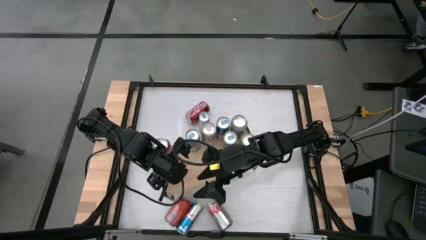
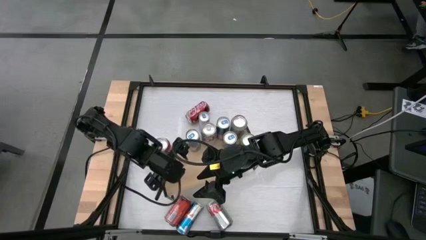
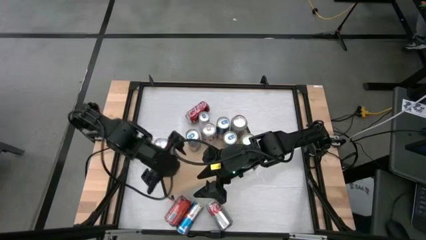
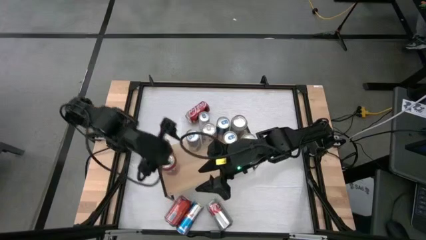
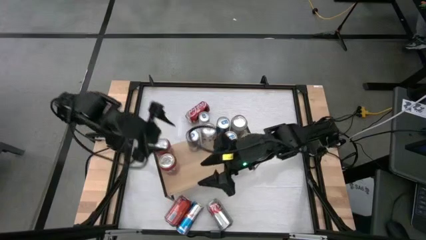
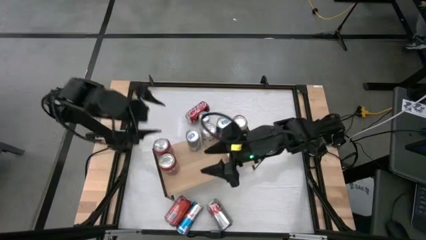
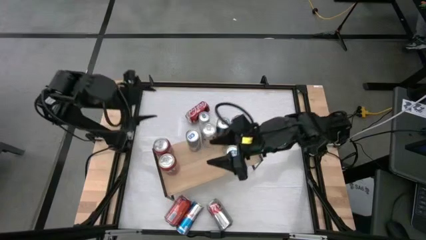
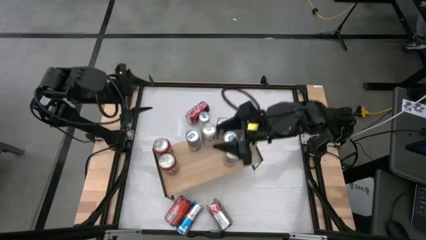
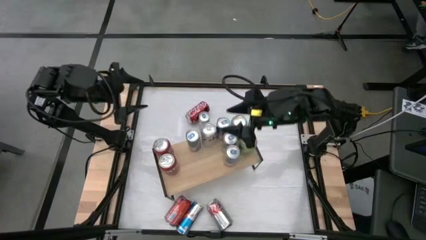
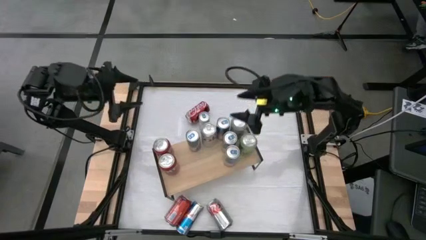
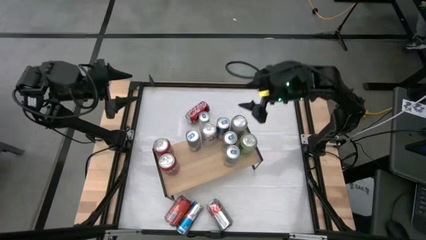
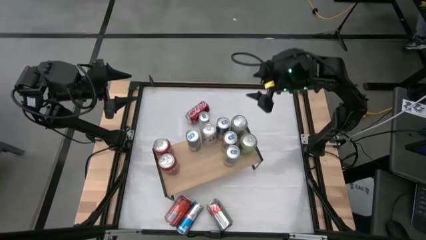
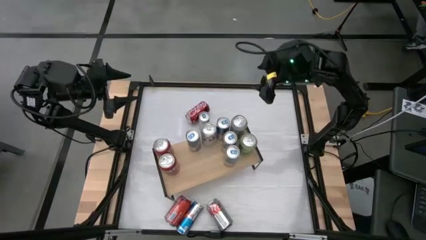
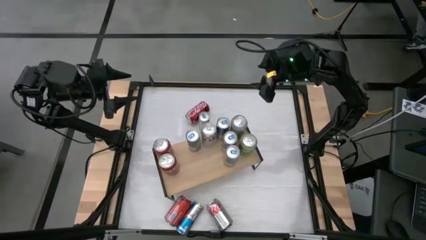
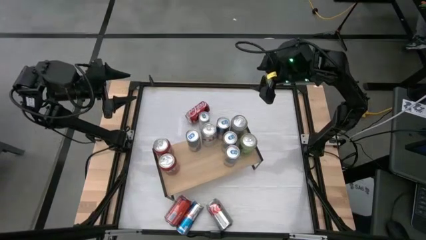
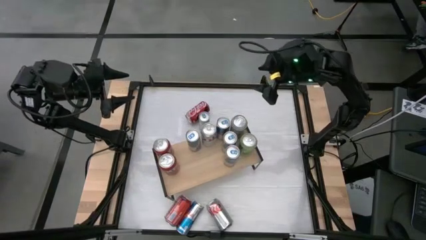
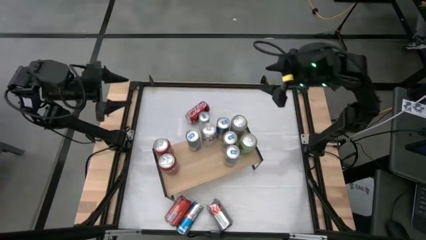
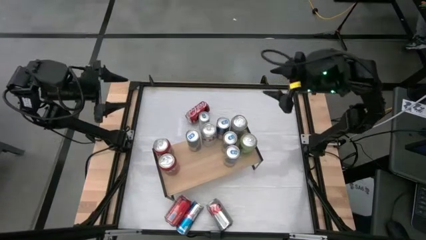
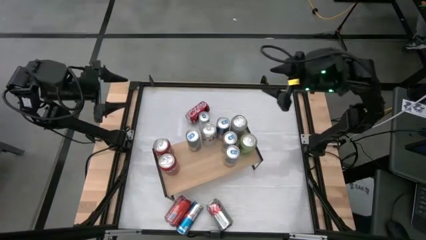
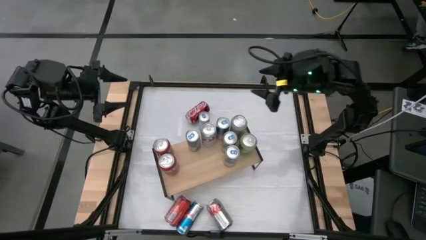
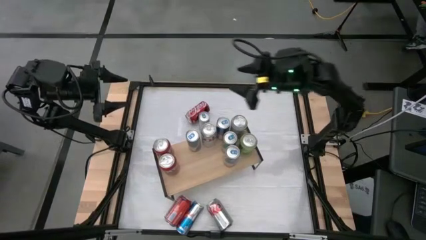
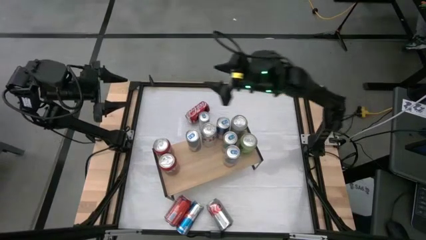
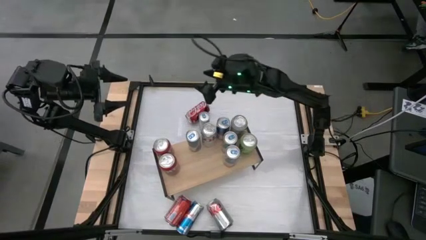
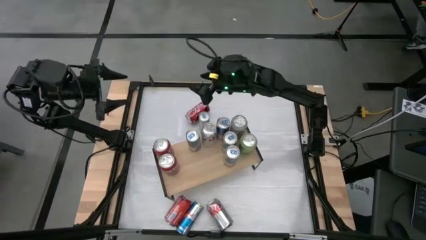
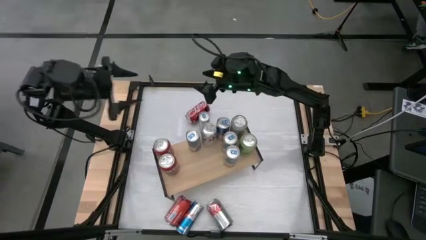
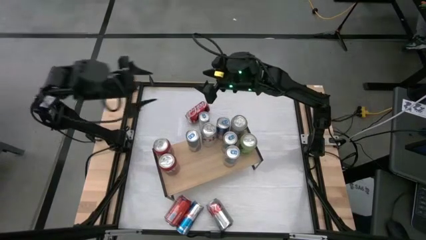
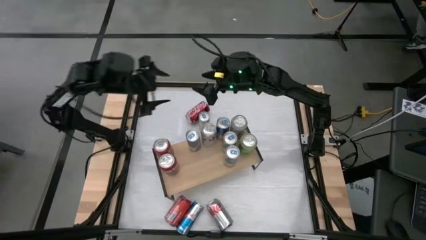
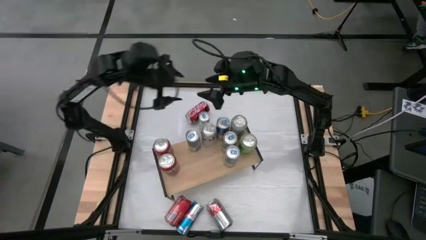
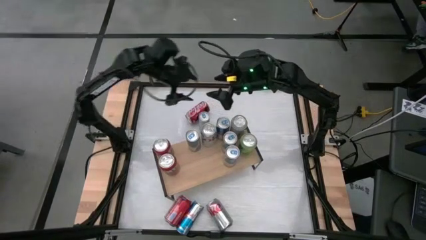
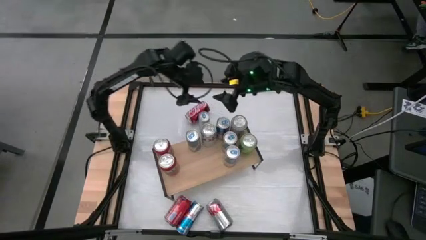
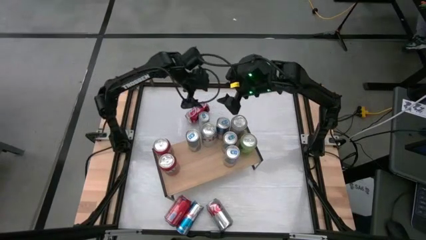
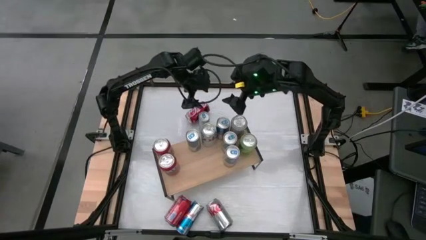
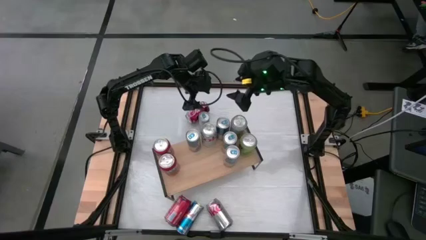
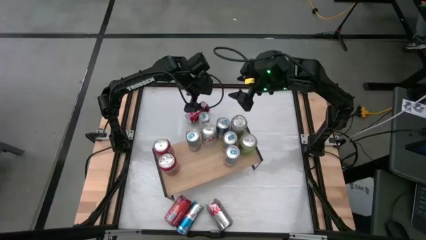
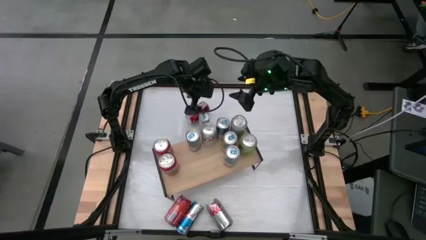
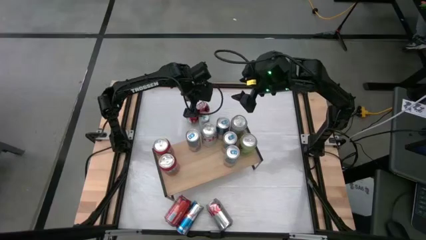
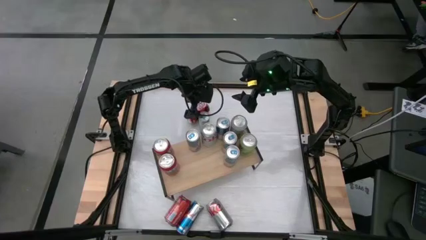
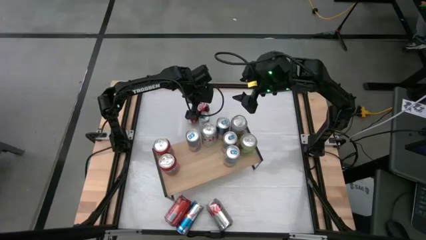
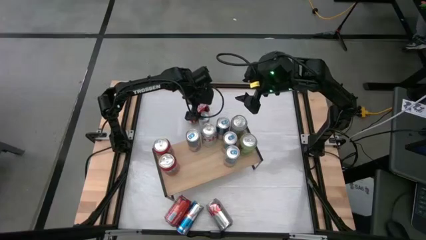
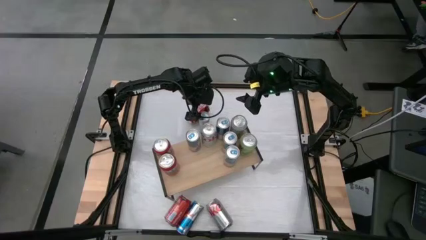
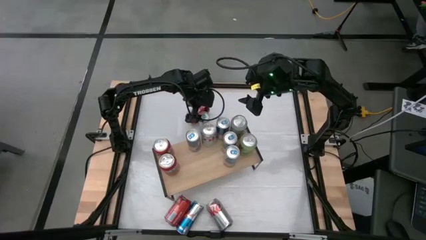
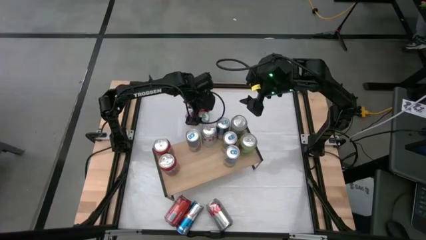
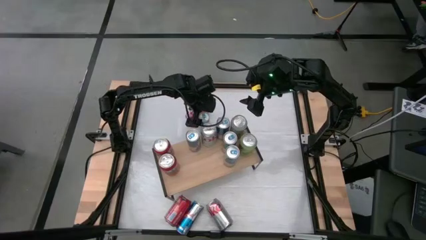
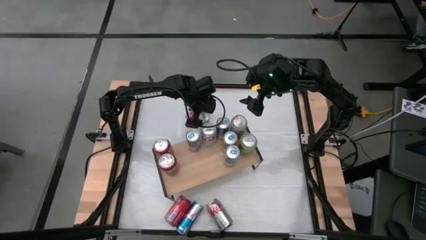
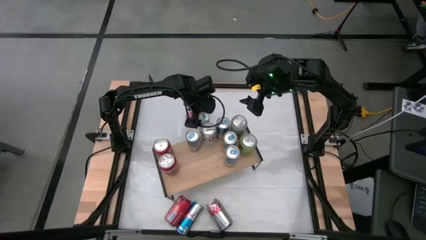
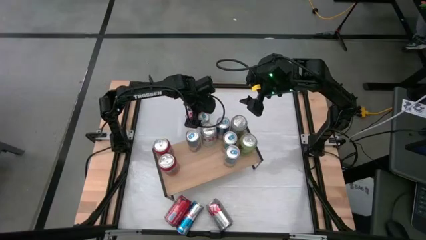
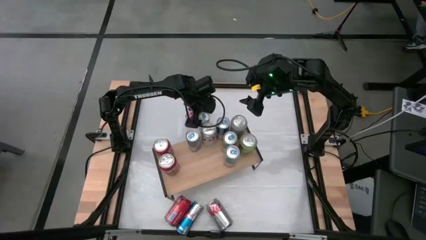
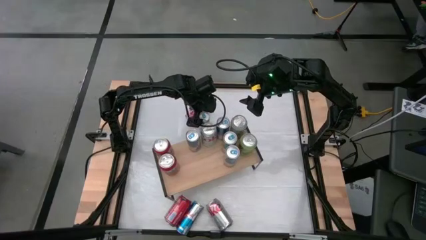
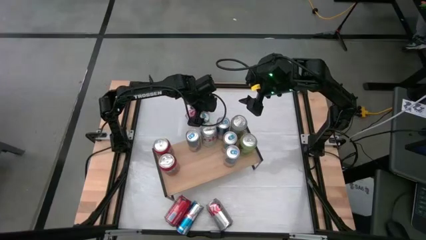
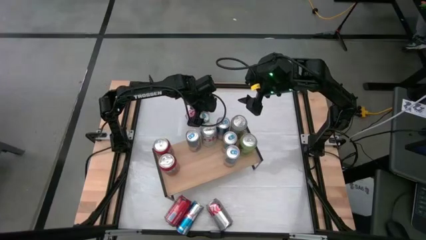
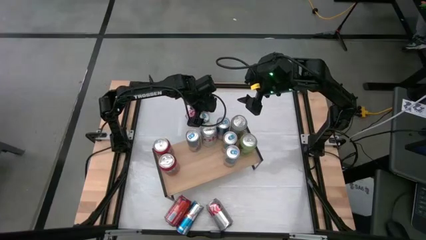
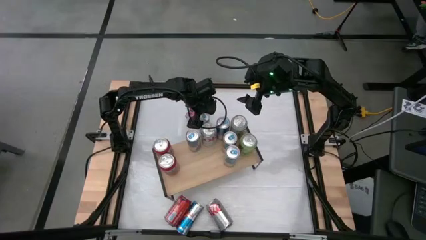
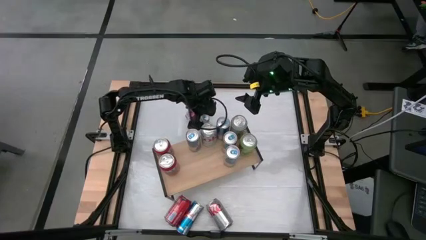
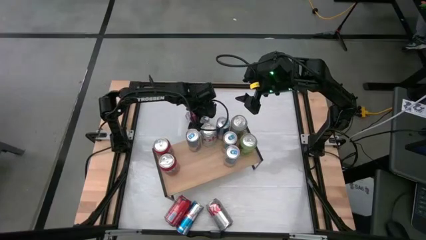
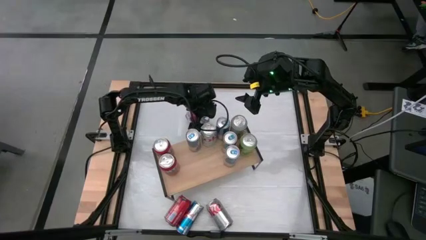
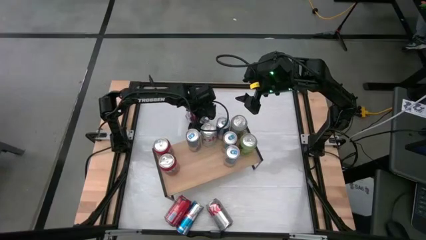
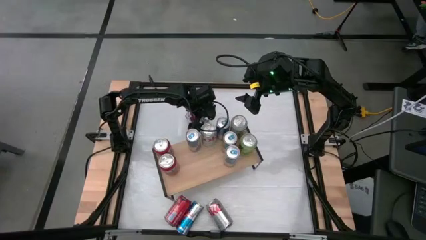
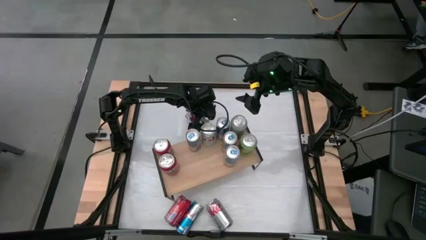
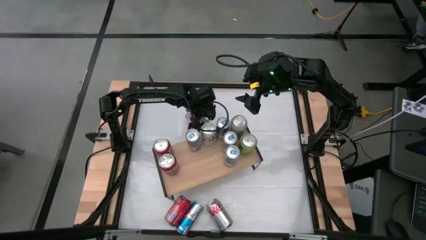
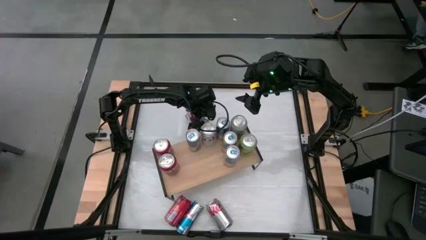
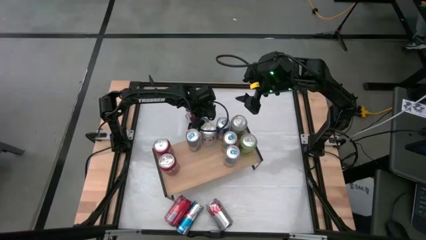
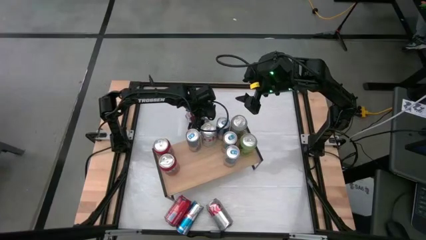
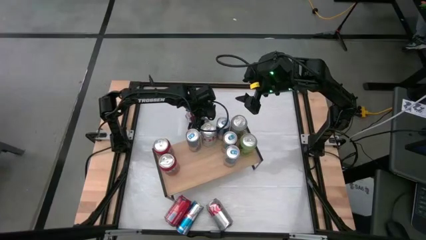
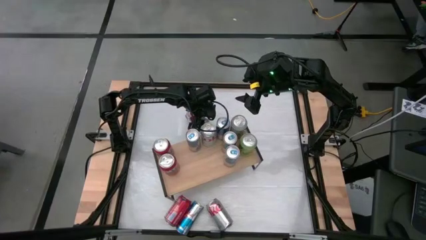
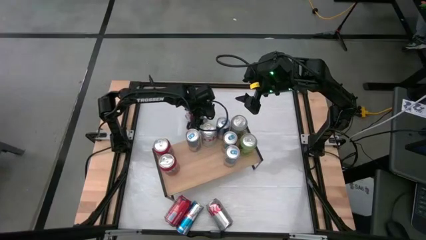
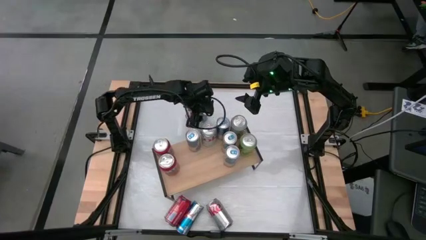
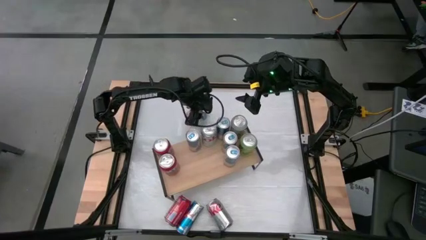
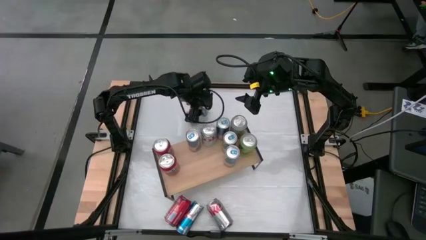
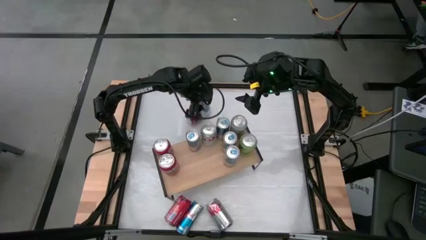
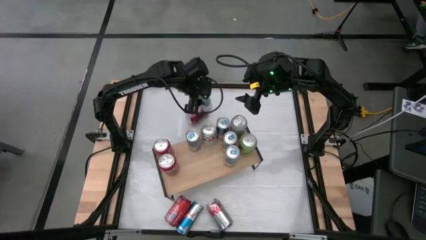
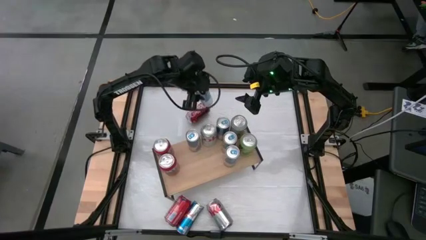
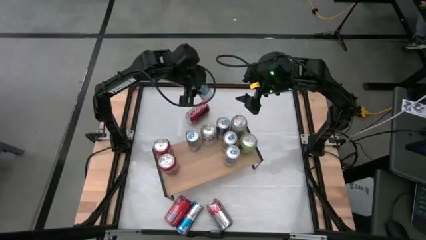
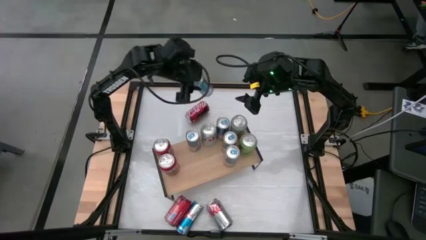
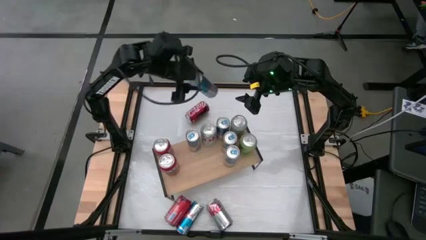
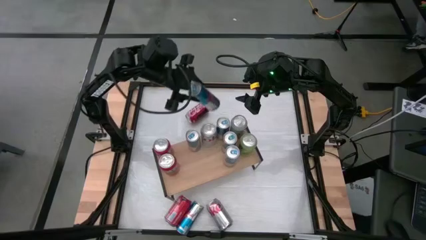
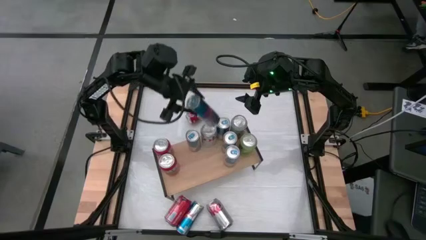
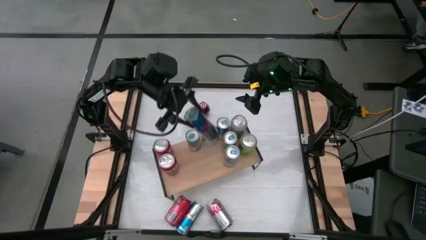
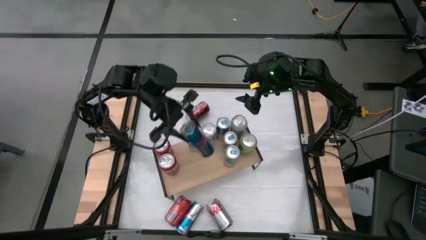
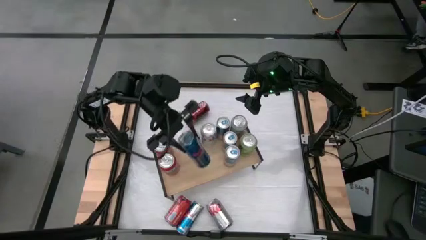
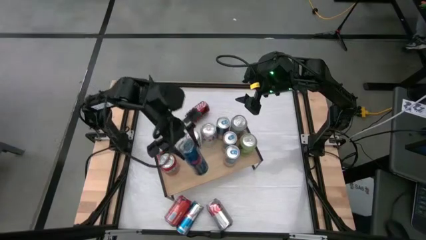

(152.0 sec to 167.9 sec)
Task: Place canned beverage on shelf
Put the blue soda can on the shelf aligned with the other blue soda can

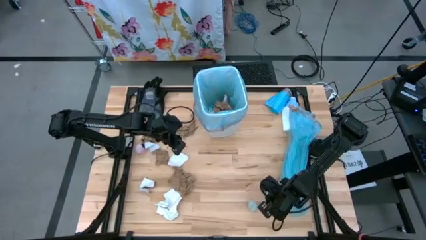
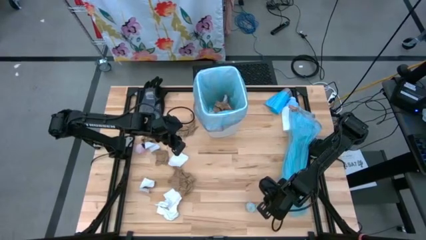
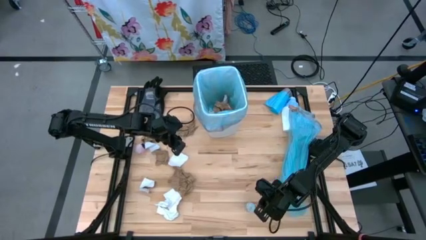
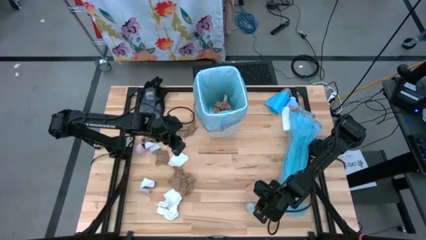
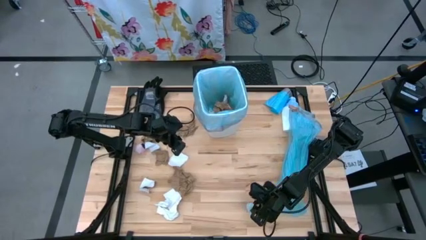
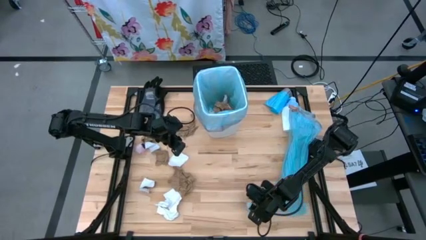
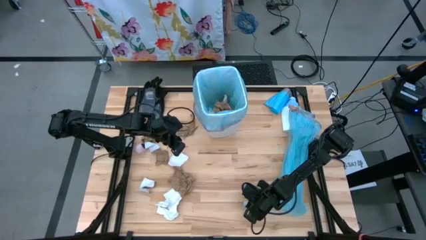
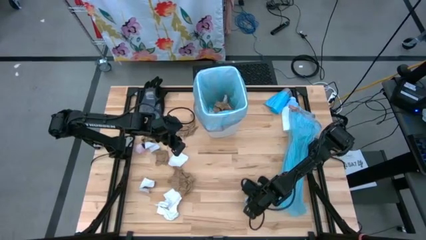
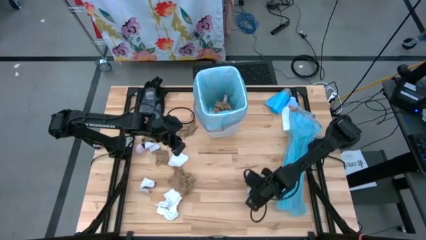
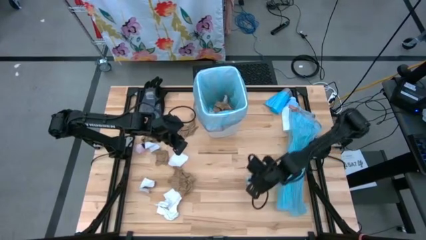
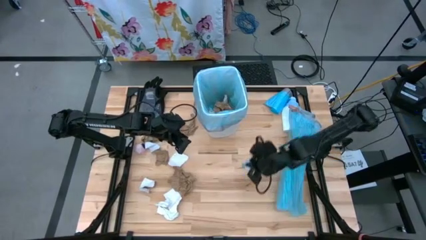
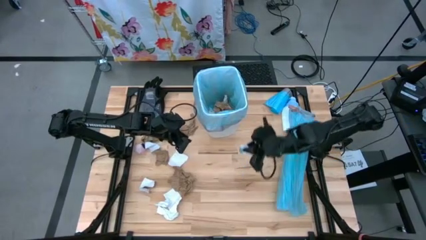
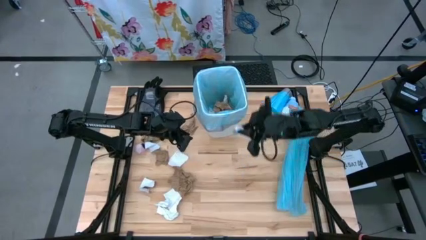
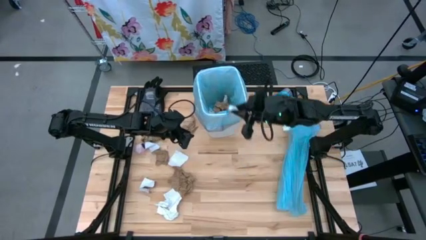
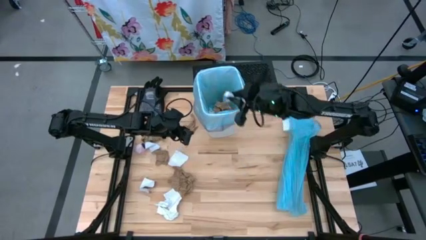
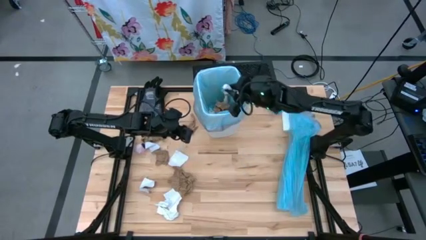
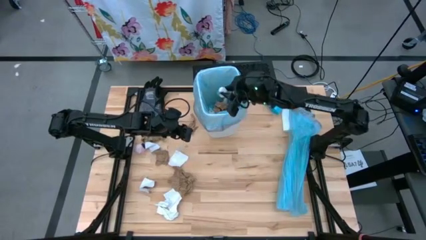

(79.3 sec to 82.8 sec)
Task: place trash/remove bag and relplace
Put the blue plastic into the trash bin
